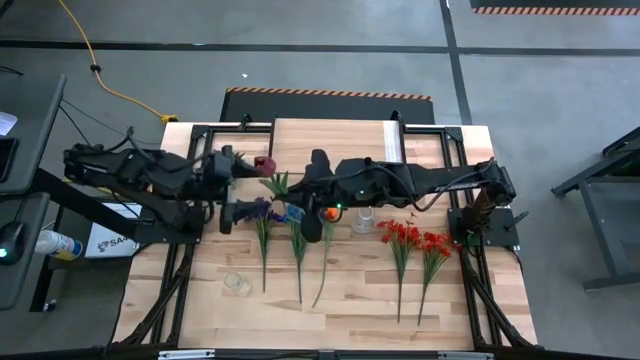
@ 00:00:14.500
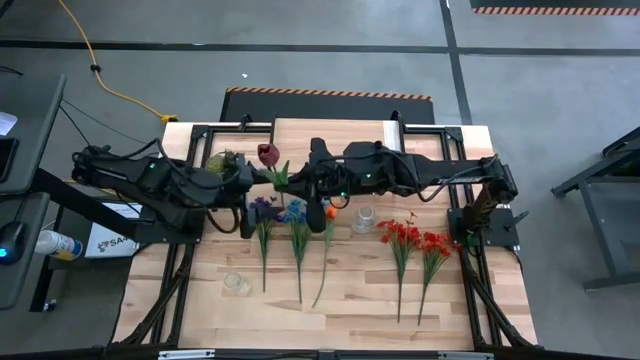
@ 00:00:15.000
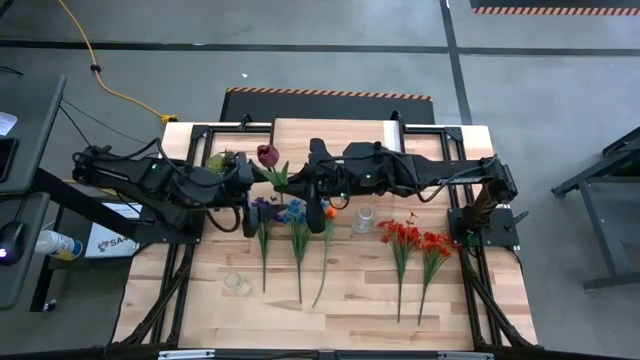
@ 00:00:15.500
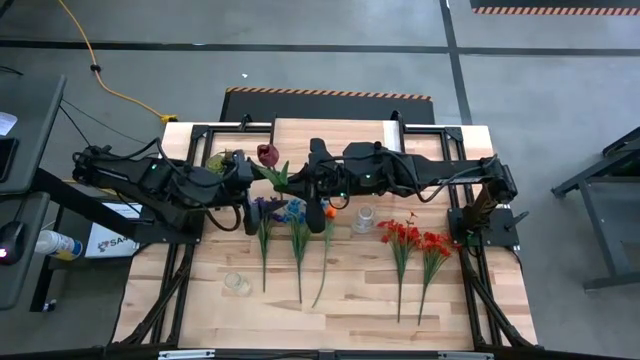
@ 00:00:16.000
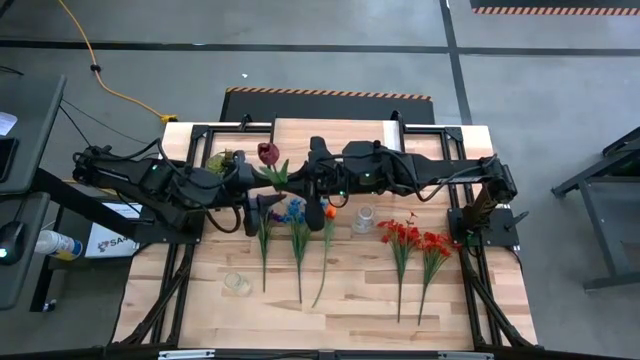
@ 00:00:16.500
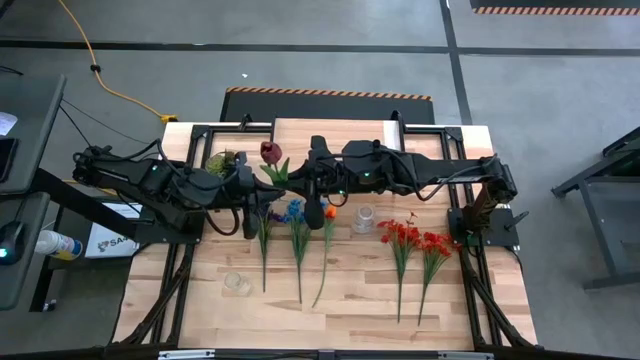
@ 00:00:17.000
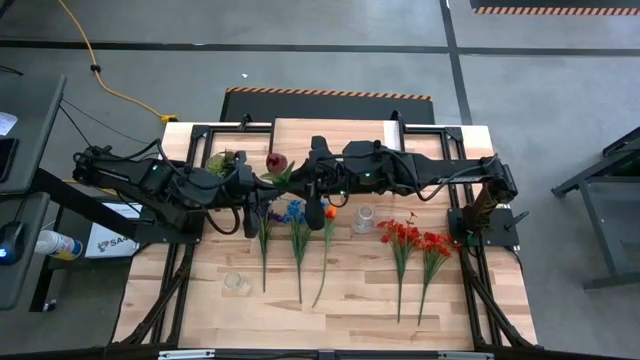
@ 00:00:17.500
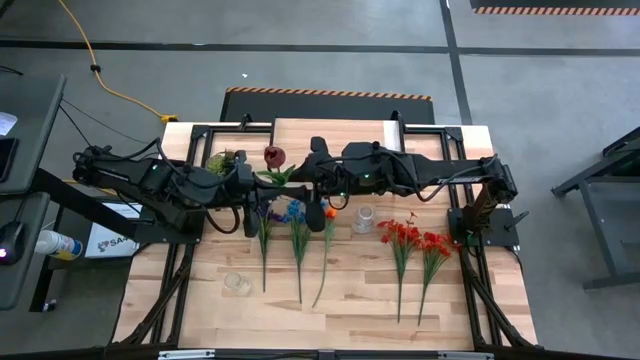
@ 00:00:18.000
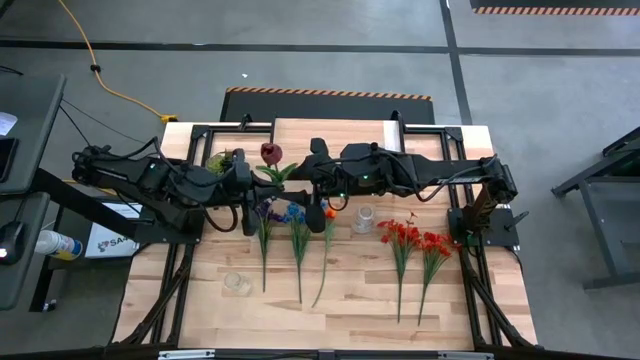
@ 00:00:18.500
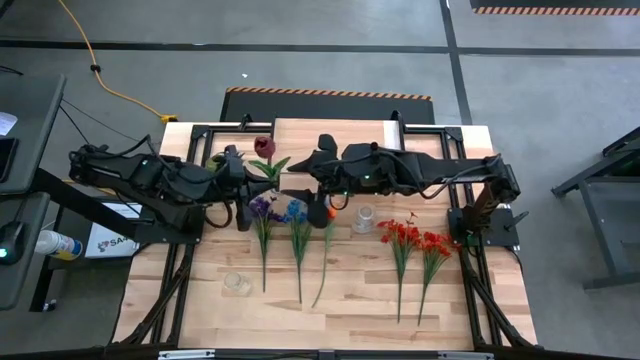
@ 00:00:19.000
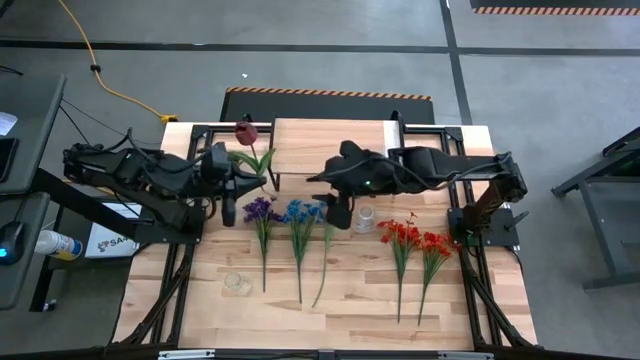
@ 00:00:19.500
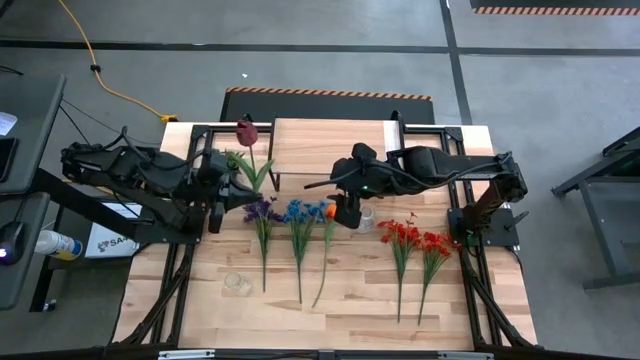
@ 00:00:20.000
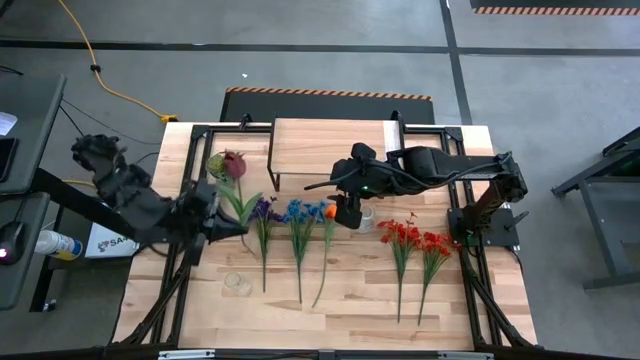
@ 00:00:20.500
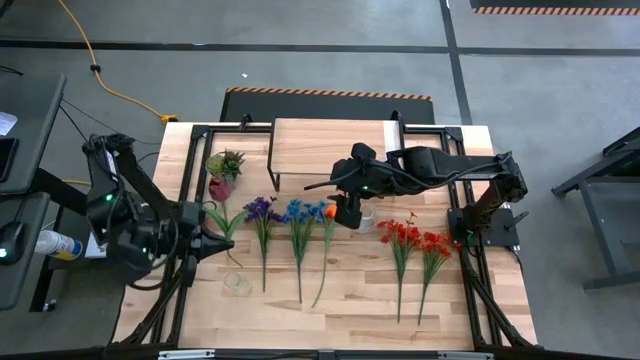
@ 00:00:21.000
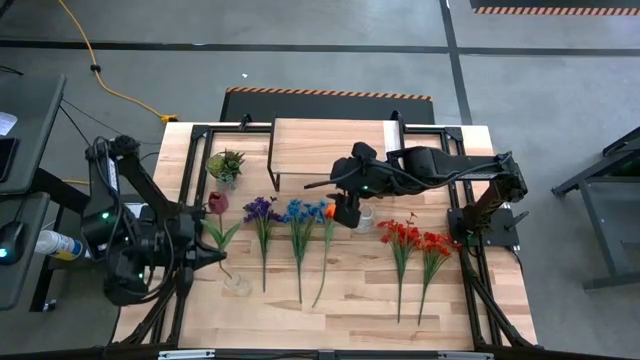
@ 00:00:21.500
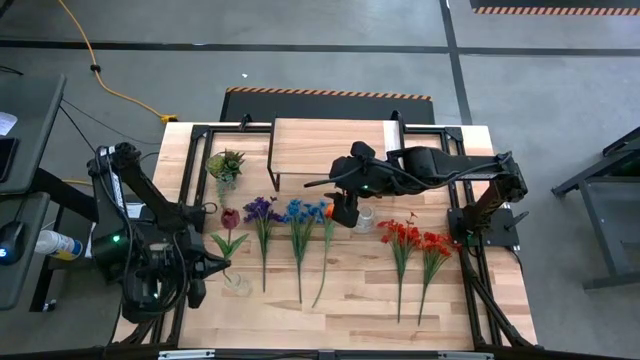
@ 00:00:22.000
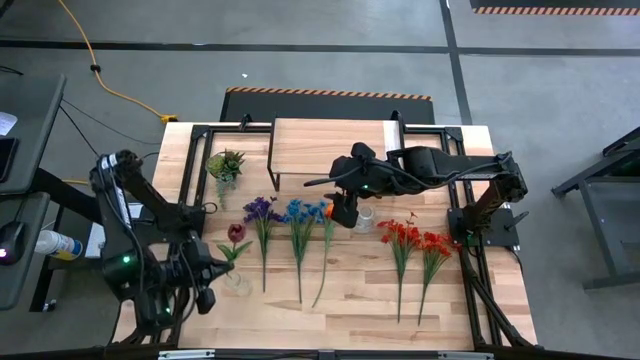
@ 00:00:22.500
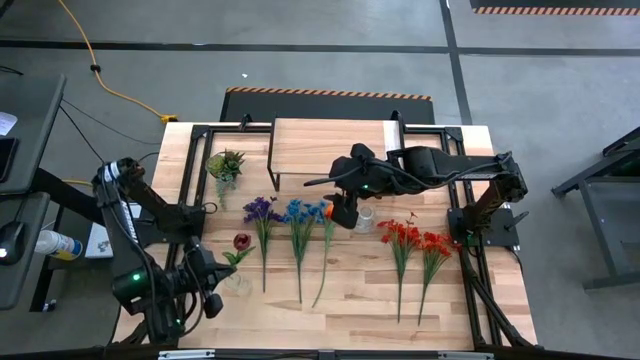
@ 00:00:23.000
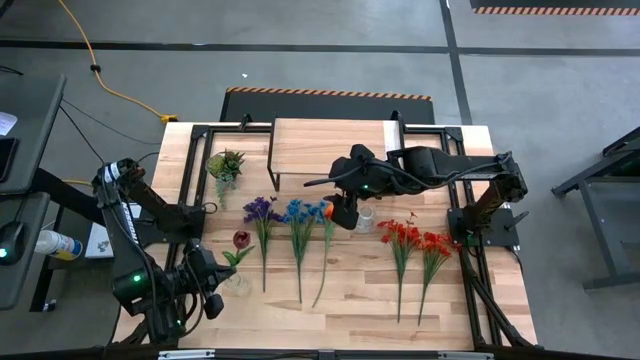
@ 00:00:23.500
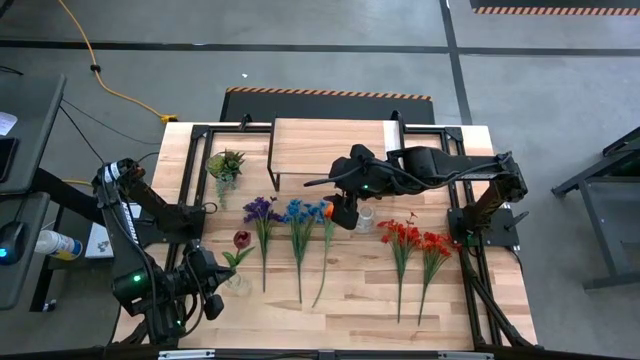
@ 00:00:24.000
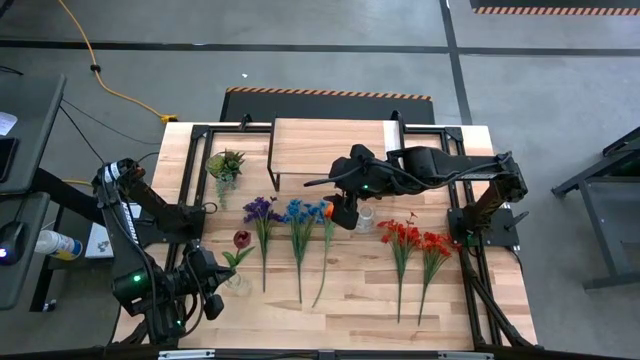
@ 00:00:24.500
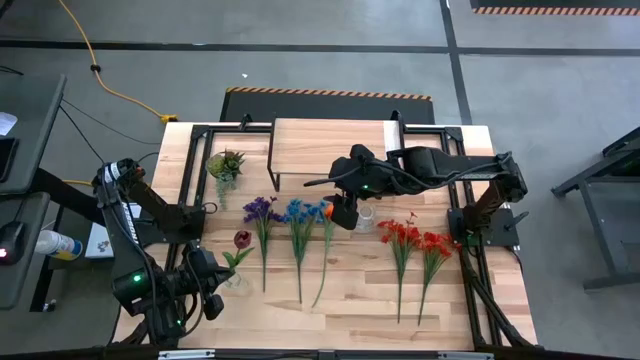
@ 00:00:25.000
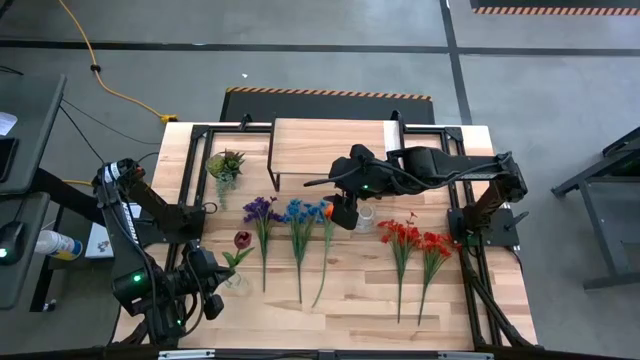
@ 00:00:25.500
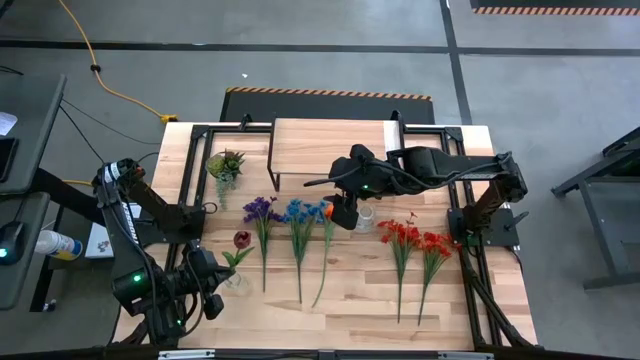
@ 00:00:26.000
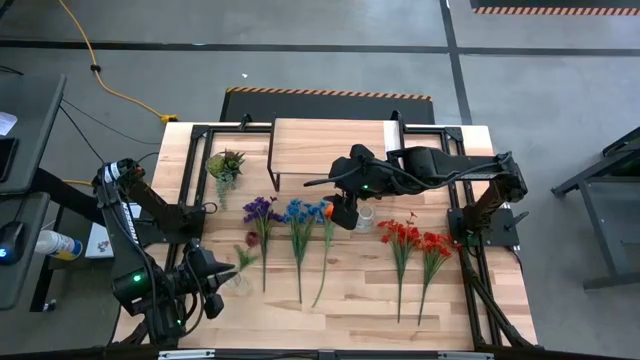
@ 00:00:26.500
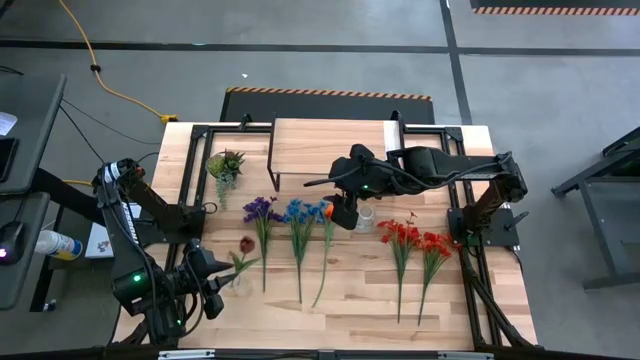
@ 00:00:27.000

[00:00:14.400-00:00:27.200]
Task: Pick and place flowers into a vace then onto a shelf
Put the red flower into the bottom transparent vase

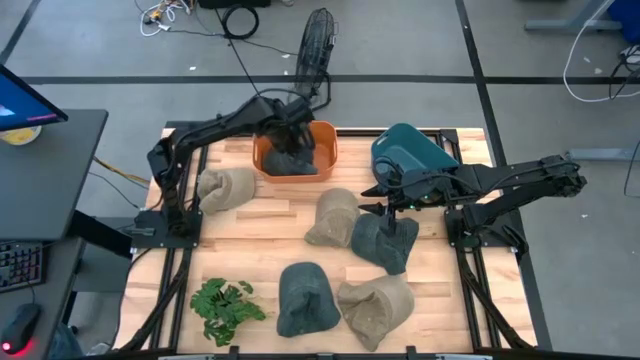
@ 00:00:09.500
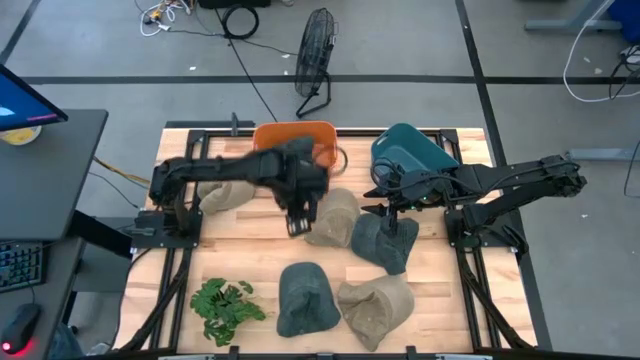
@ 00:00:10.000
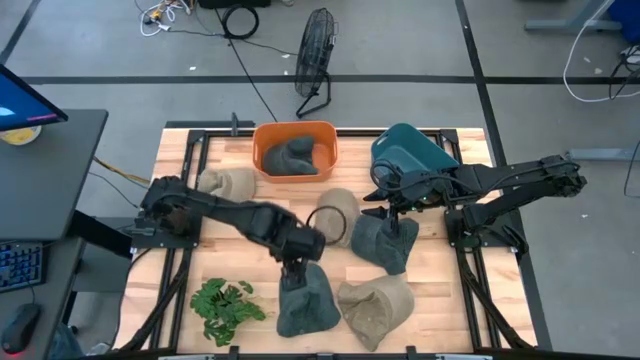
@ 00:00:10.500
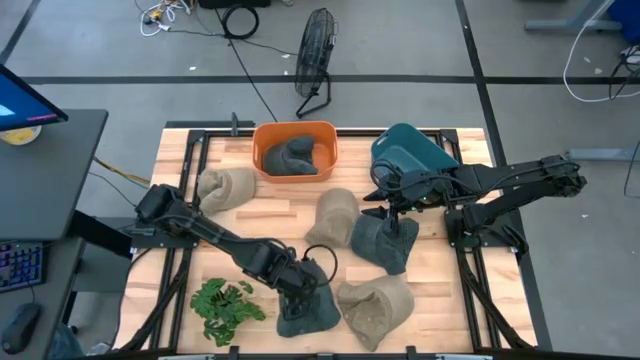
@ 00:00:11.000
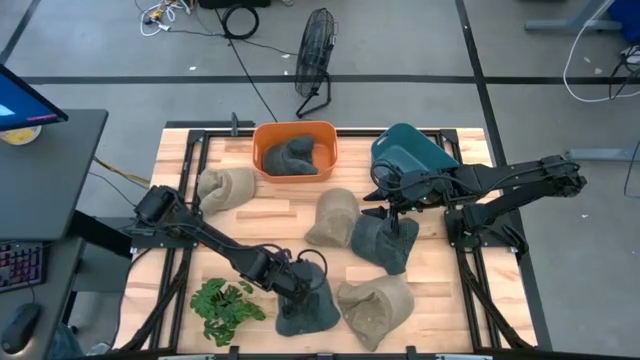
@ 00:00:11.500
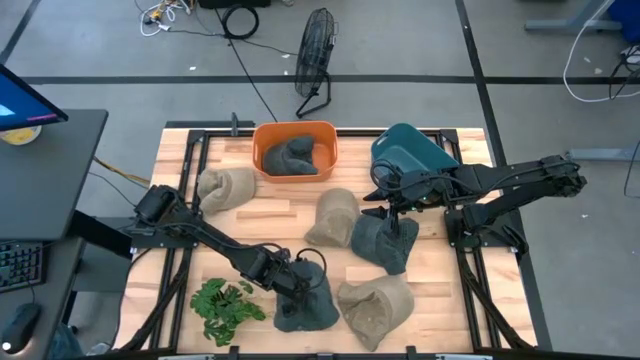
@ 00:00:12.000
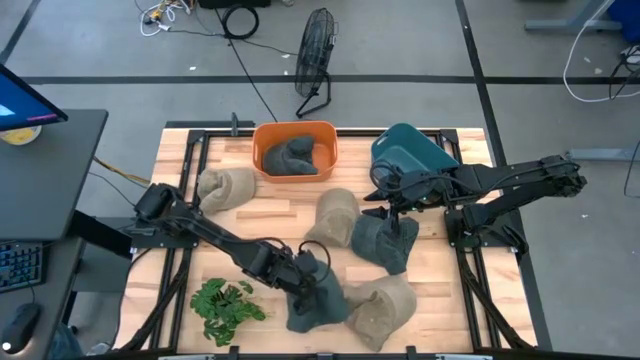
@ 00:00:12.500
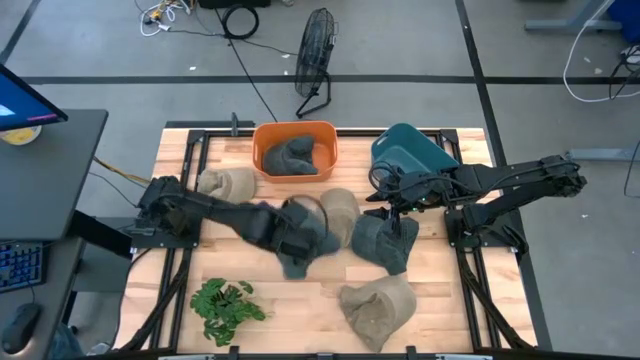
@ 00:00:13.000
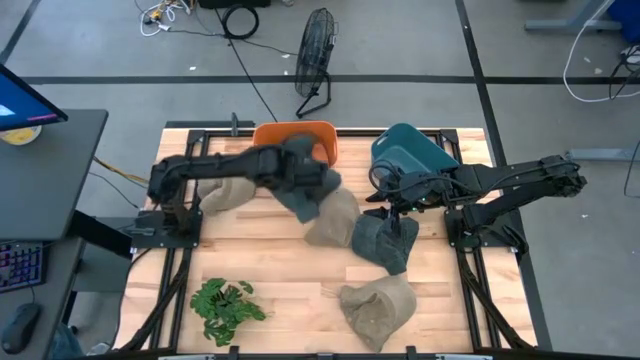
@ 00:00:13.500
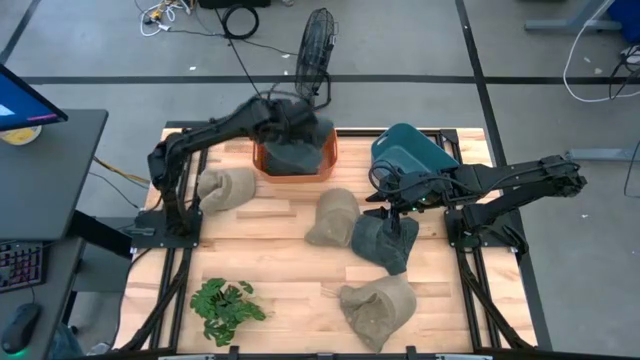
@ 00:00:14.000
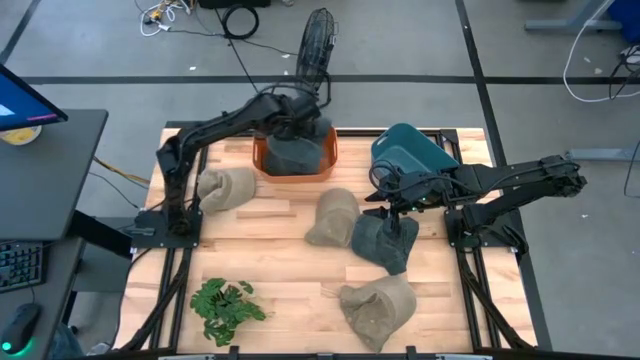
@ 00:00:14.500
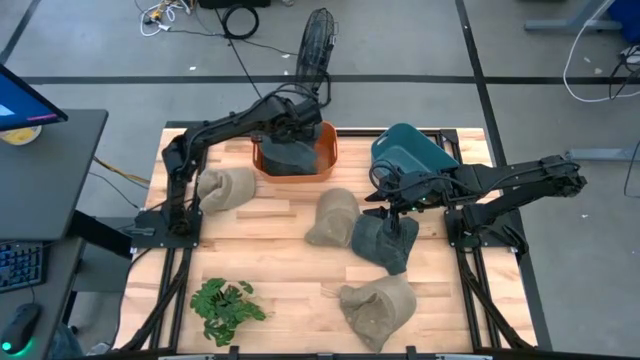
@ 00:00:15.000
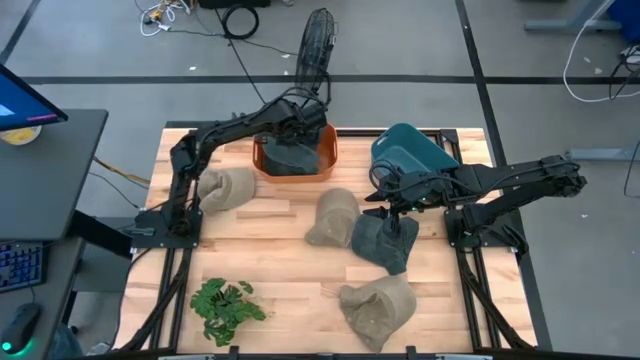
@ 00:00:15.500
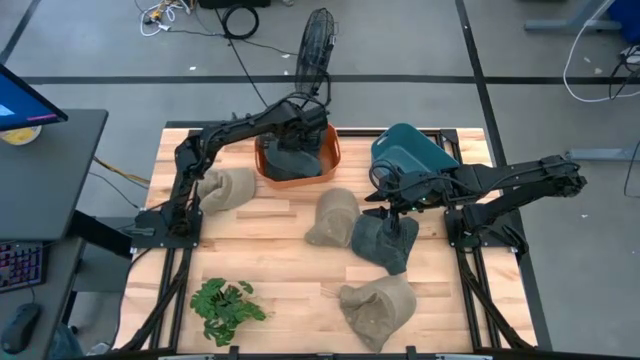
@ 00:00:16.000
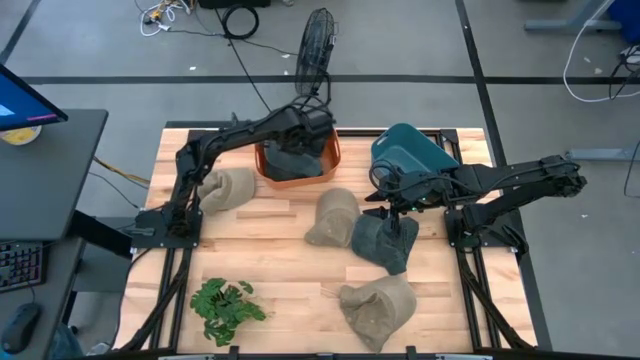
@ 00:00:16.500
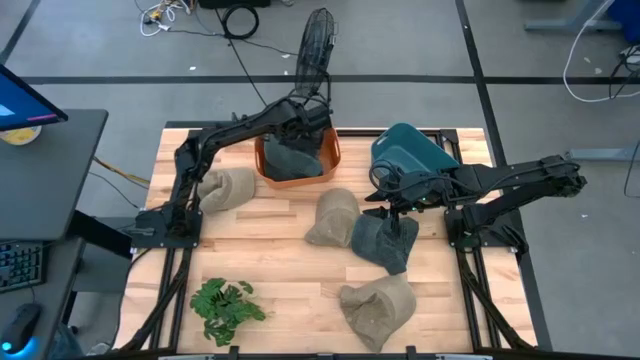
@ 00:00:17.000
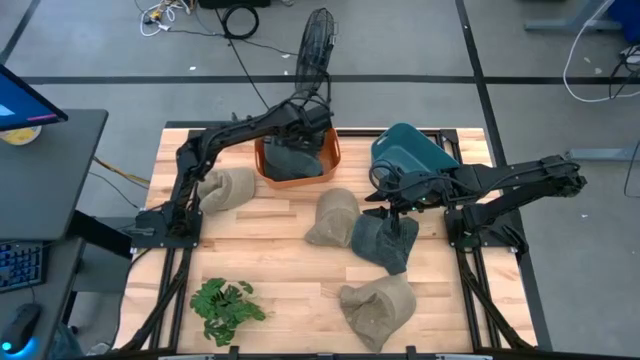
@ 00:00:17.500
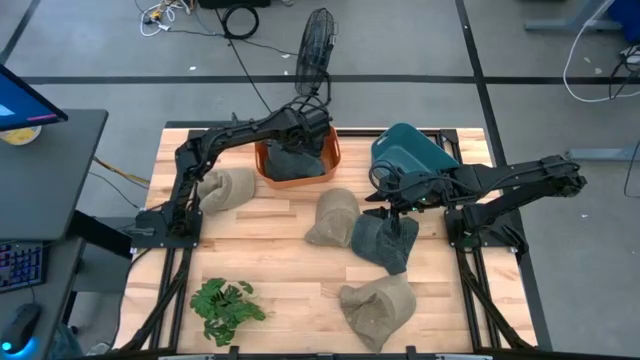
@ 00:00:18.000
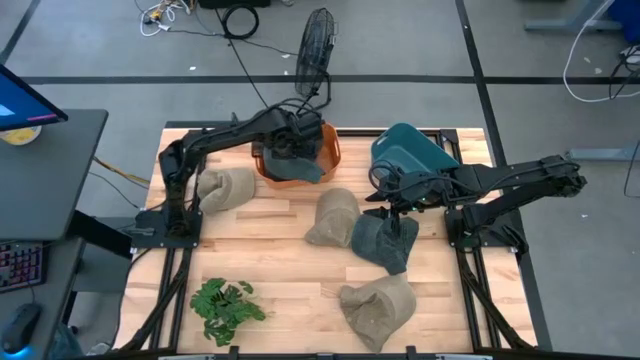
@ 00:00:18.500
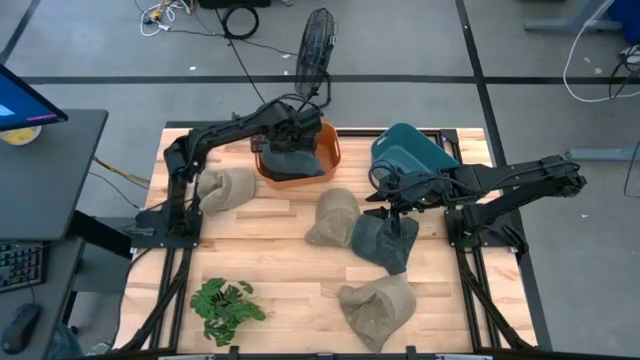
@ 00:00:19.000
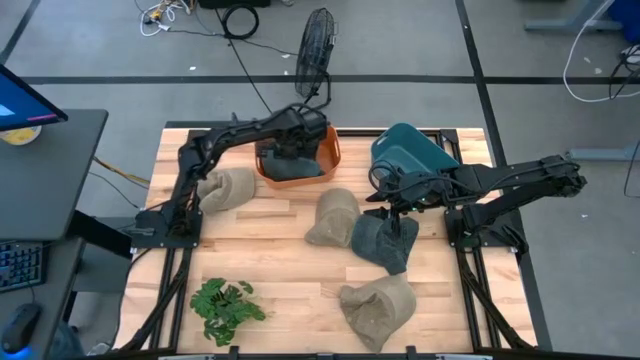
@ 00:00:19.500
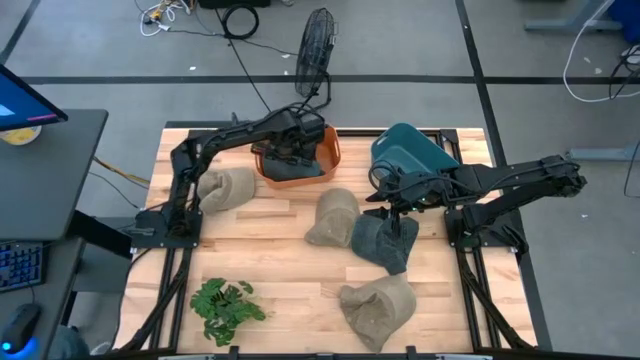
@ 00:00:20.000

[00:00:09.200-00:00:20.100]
Task: Pick & Place hat
Put the bottom blue cap into the orange bin
